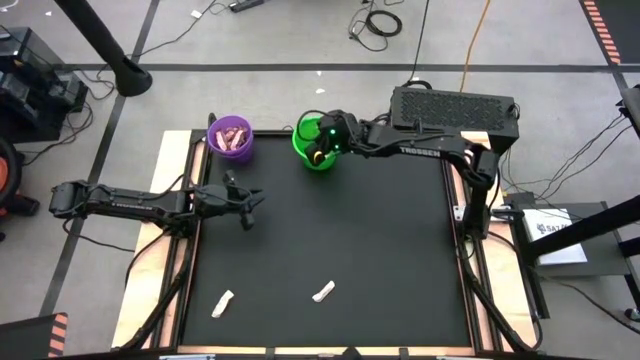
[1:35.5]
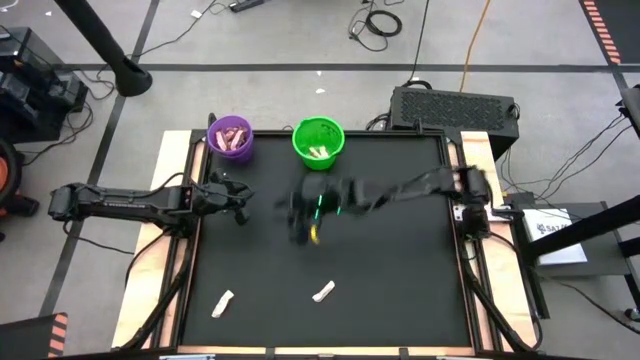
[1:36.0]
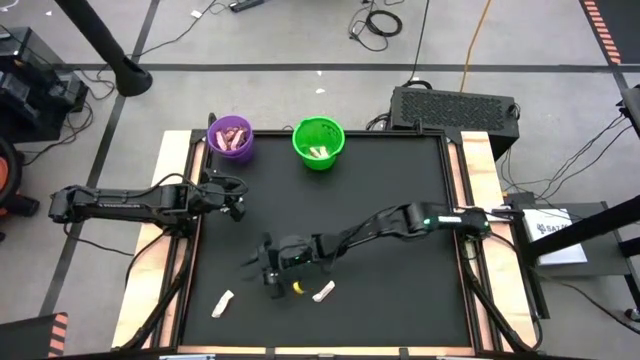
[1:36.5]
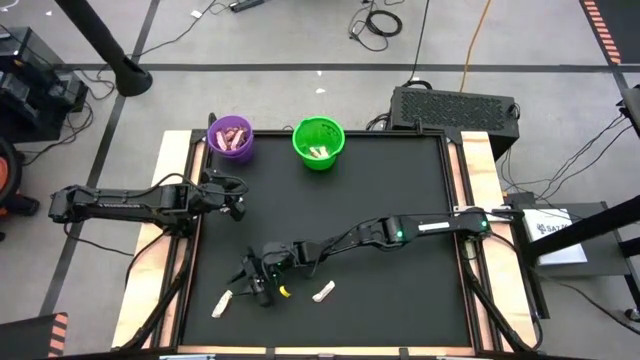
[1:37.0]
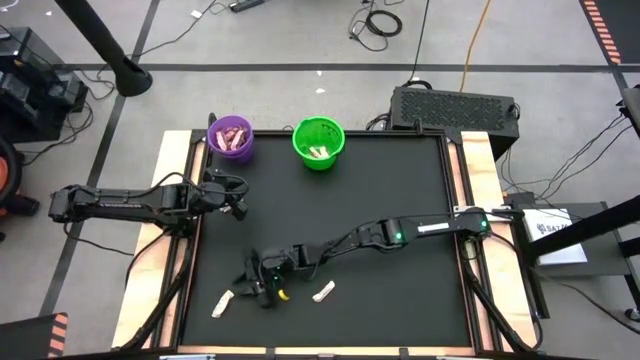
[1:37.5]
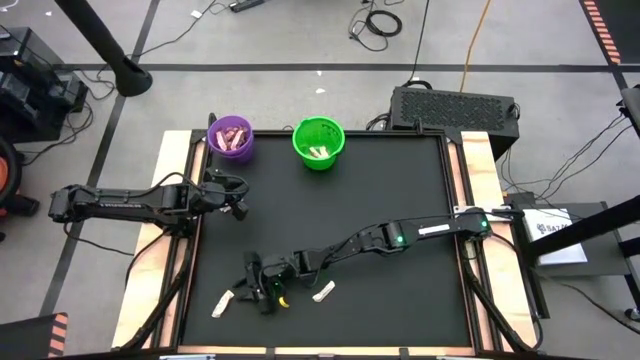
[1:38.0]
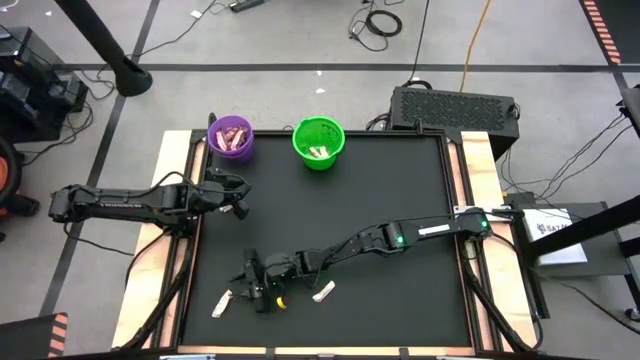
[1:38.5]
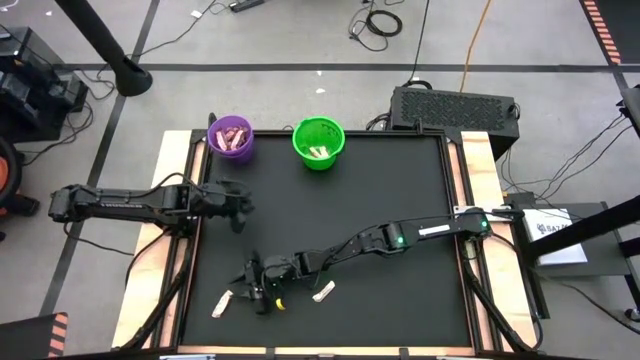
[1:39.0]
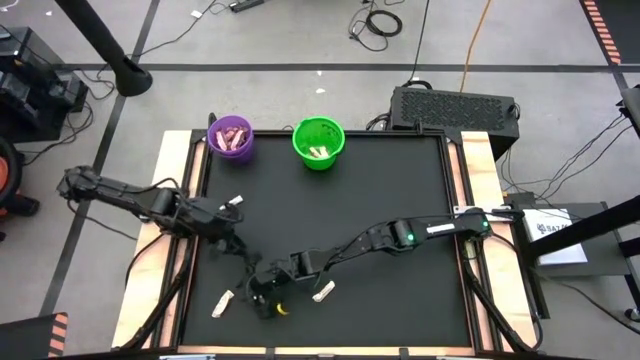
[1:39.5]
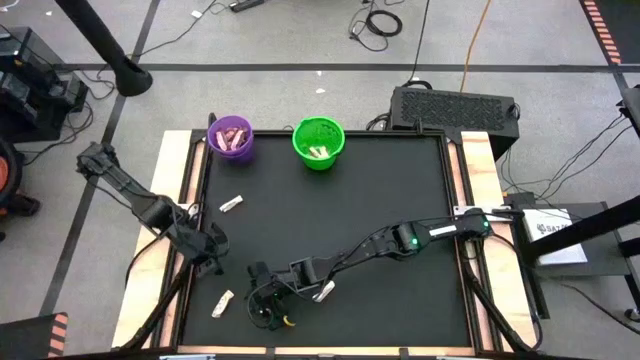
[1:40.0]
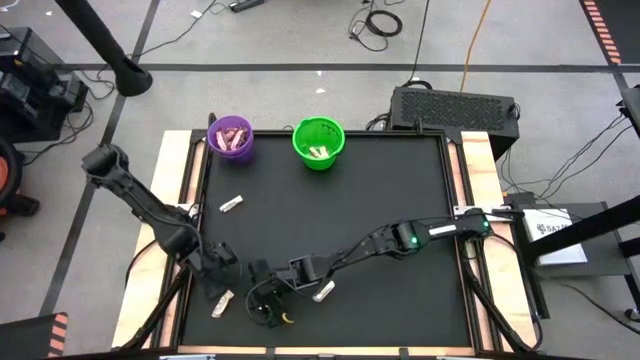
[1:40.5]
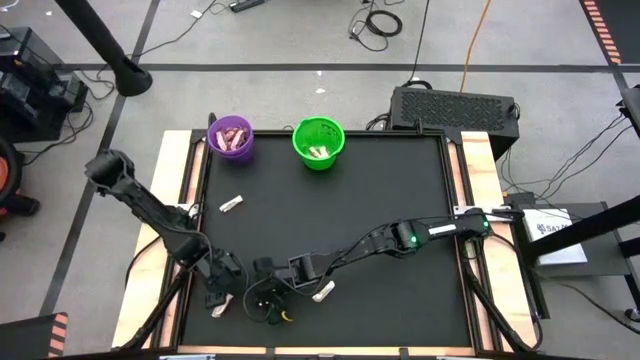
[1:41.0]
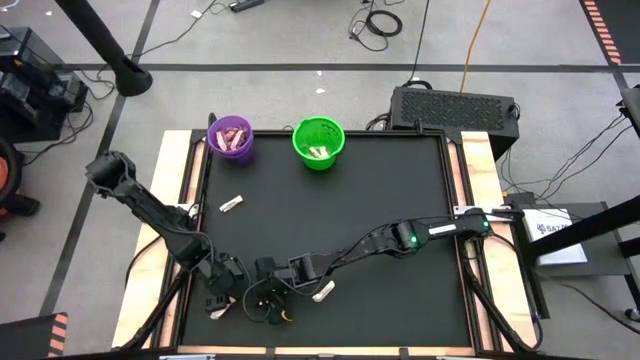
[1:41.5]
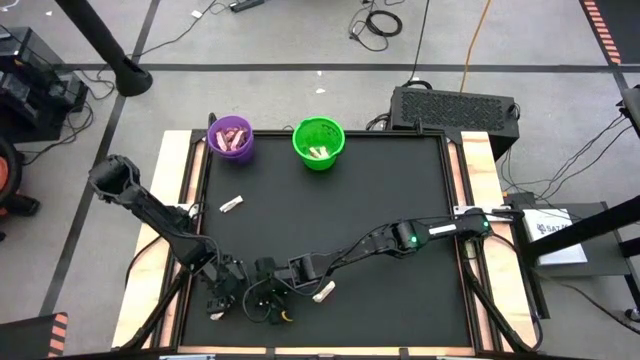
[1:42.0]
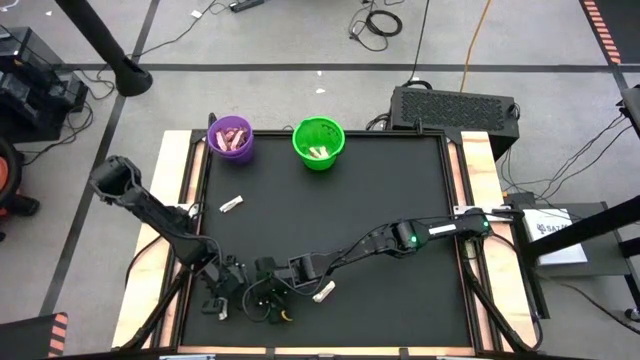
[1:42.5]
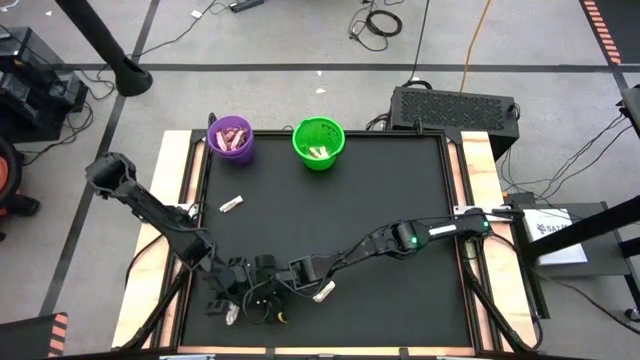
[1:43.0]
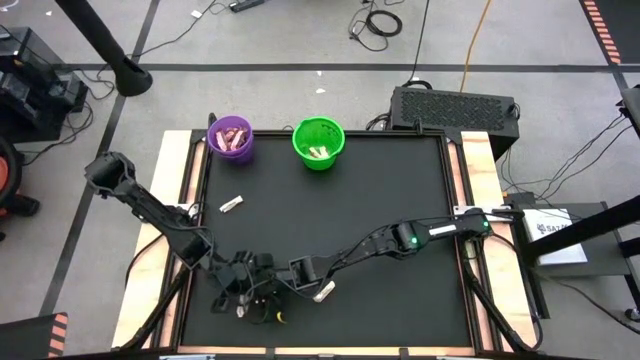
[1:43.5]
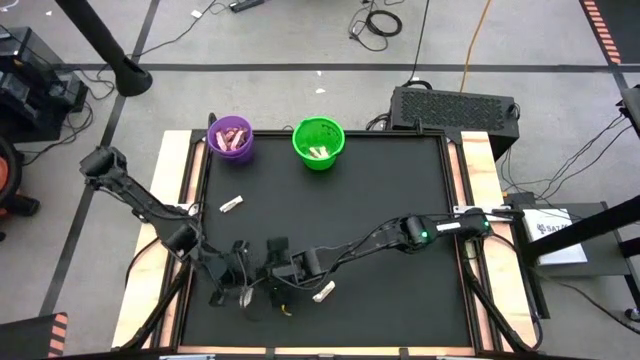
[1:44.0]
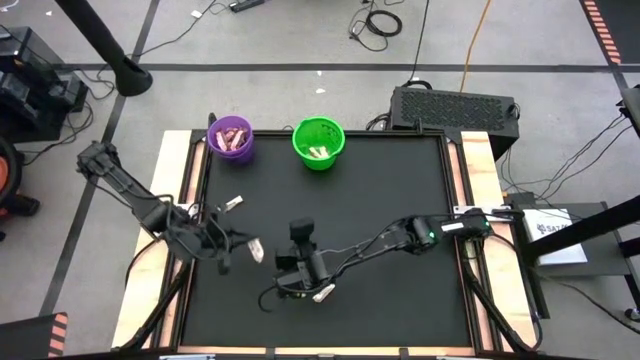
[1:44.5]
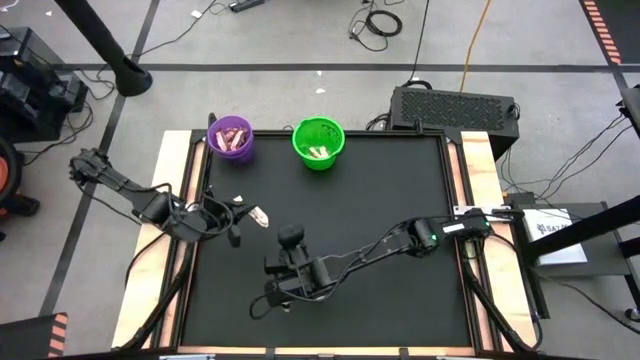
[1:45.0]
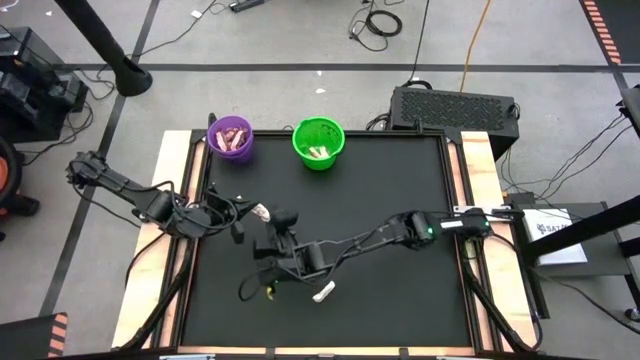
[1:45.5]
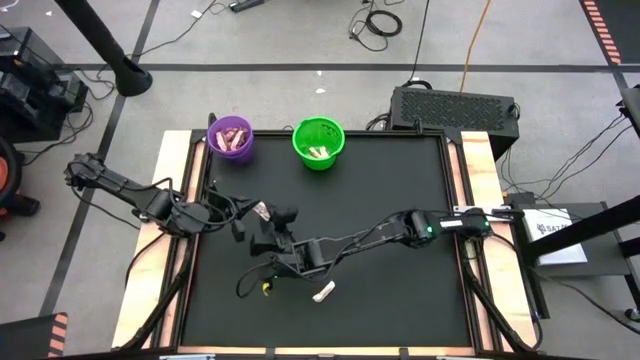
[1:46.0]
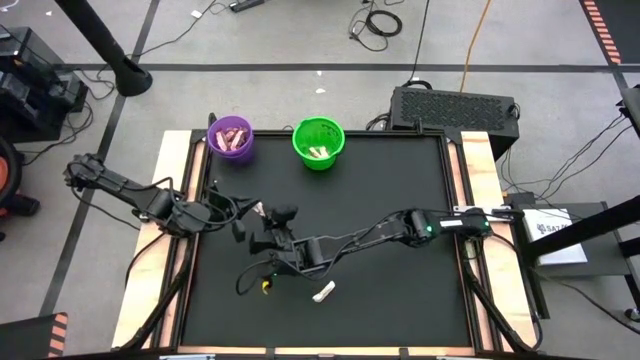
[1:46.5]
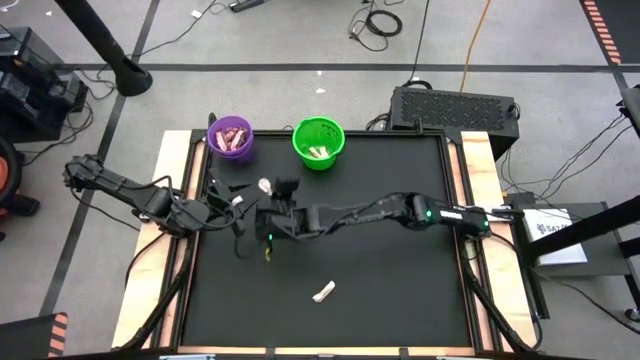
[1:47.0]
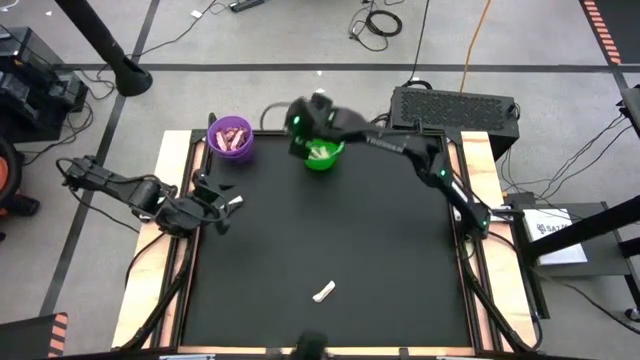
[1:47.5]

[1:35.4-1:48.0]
Task: Sort candy by brand, put in halloween buckets
Put the white chocolate bar into the green bucket

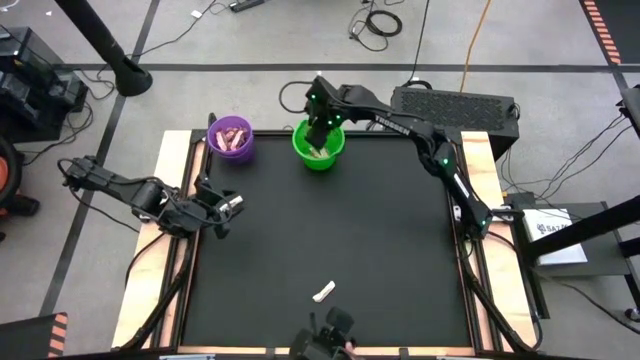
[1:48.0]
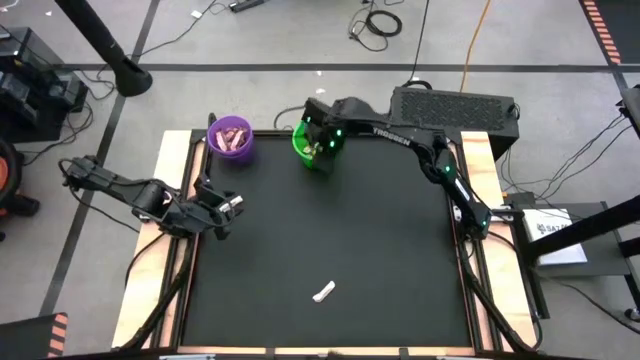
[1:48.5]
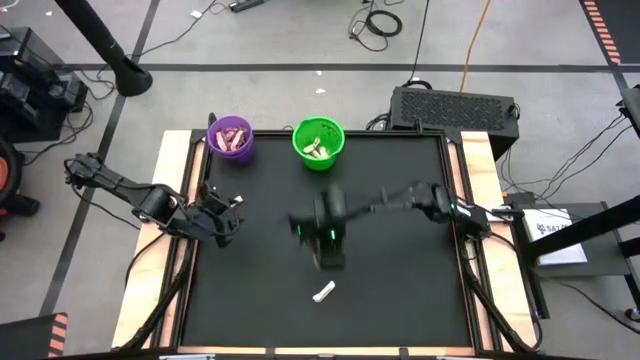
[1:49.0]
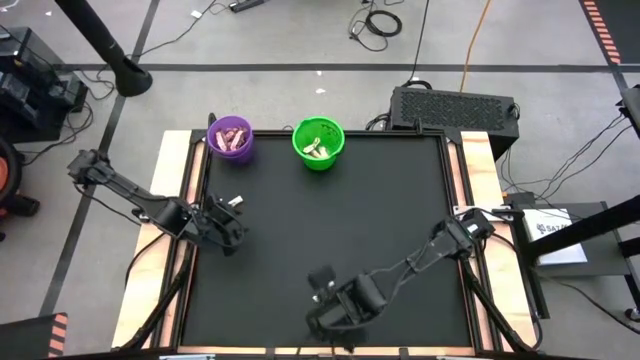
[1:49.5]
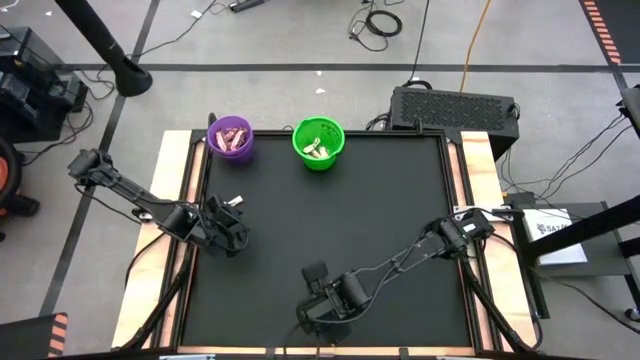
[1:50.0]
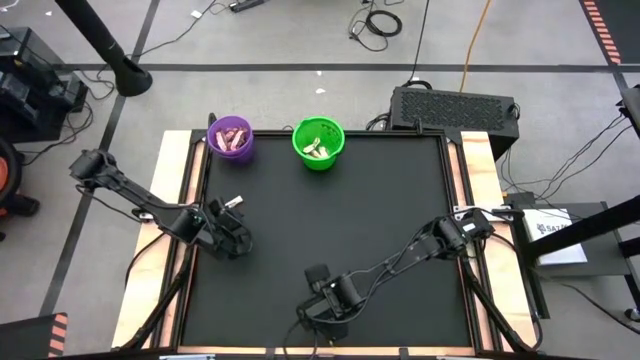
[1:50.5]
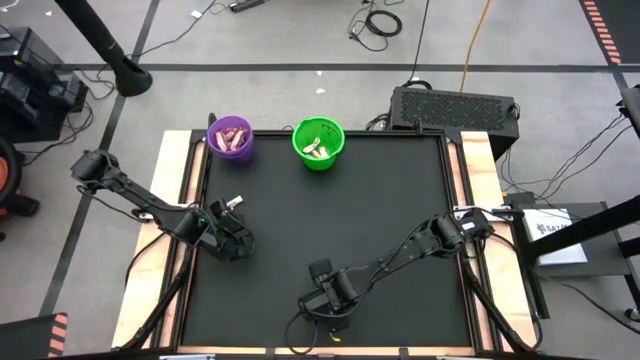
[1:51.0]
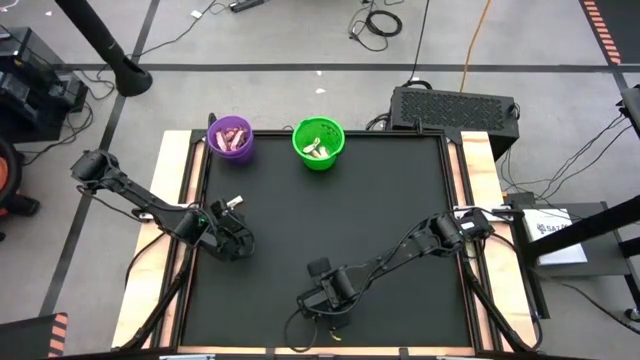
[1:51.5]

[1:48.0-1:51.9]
Put the white chocolate bar into the green bucket

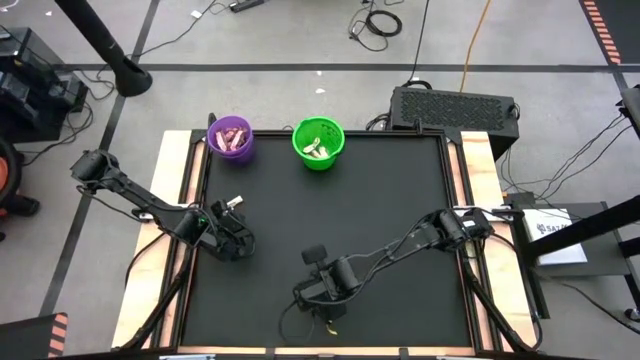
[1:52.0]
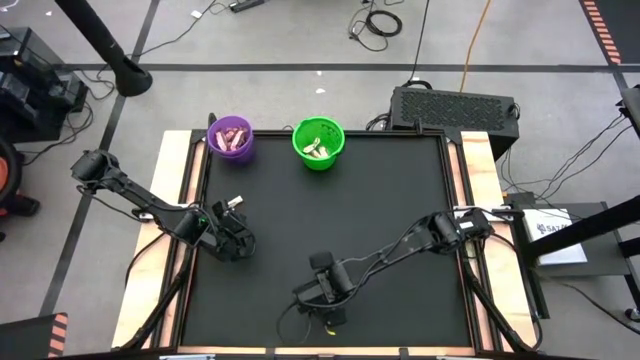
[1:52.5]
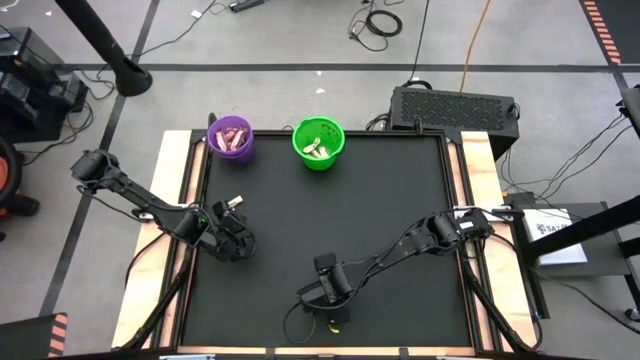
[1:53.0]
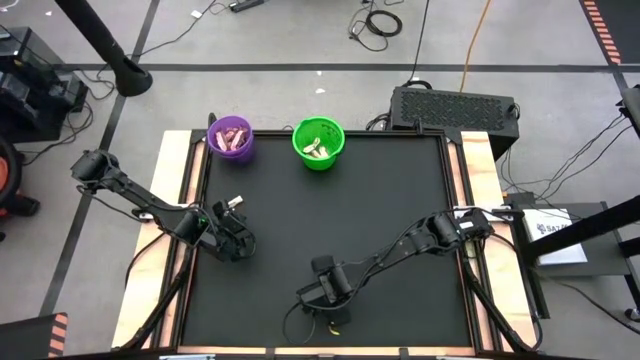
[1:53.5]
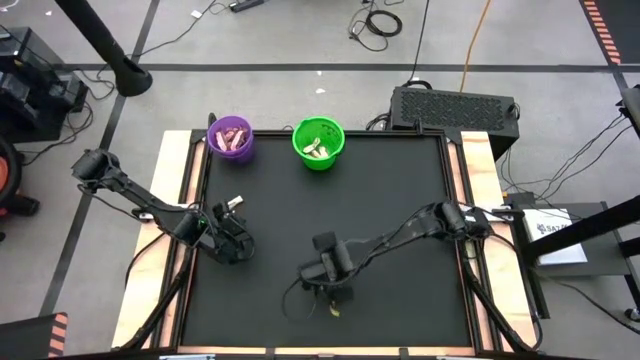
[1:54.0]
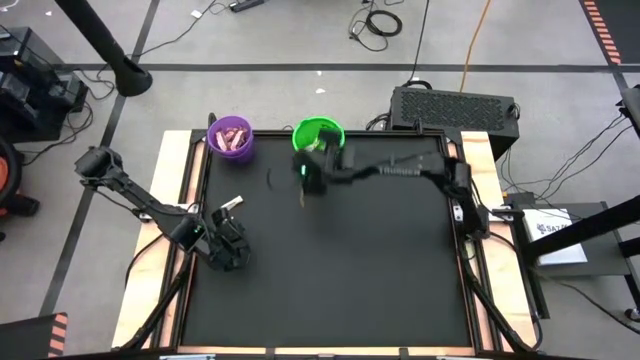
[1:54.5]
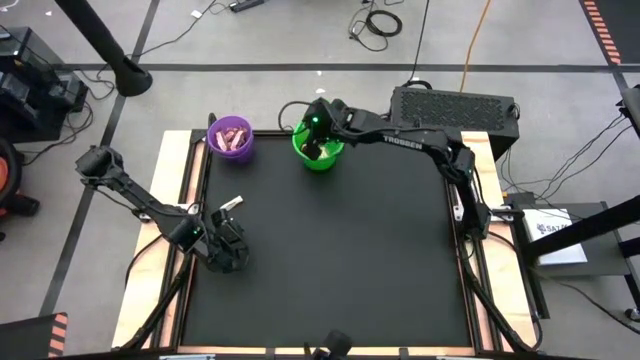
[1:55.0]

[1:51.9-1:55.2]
Put the white chocolate bar into the green bucket

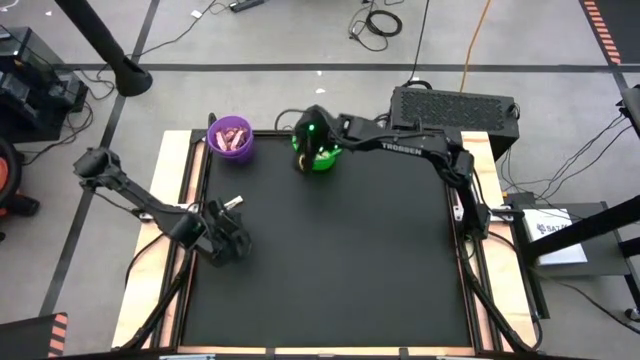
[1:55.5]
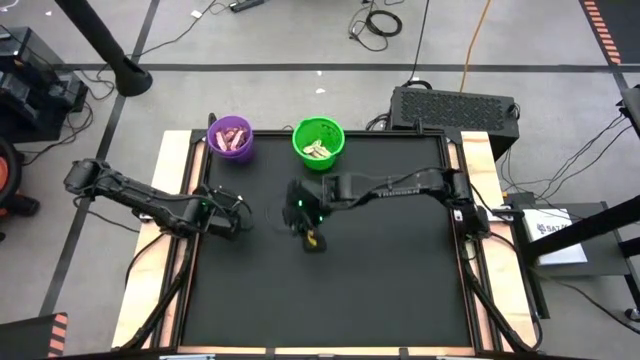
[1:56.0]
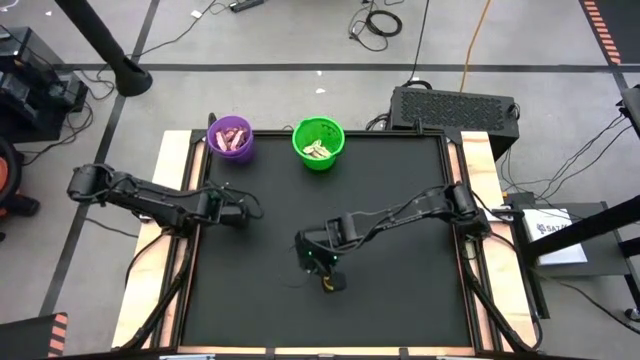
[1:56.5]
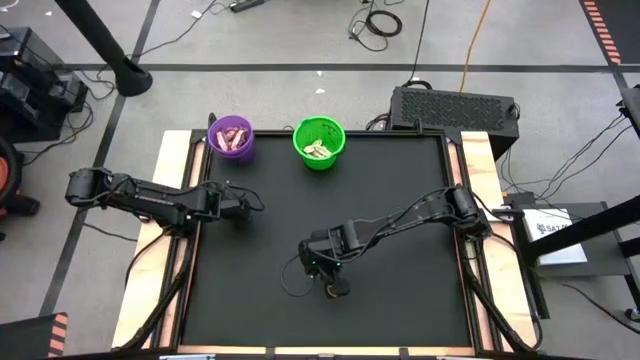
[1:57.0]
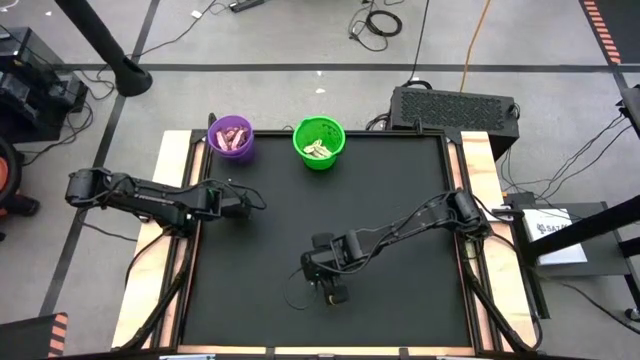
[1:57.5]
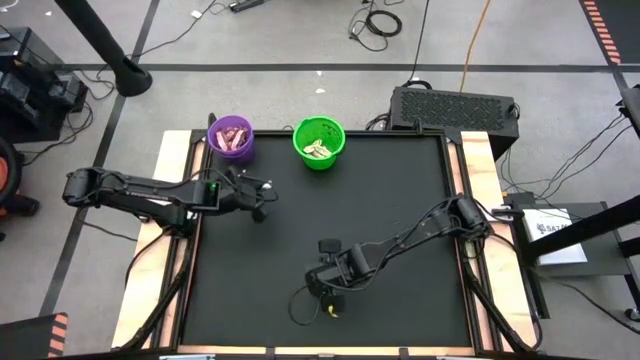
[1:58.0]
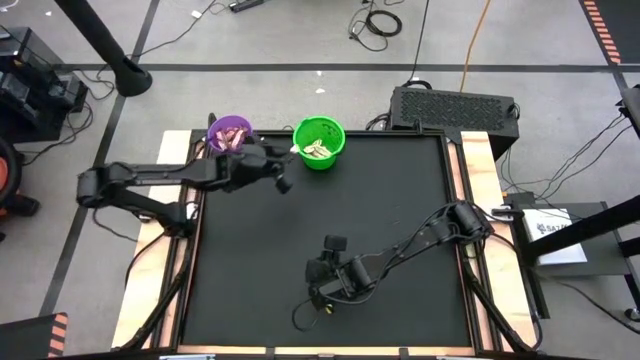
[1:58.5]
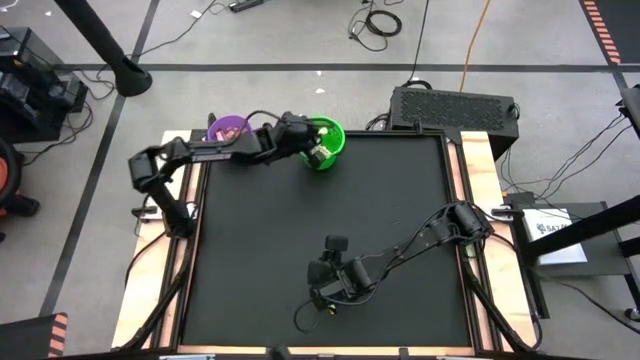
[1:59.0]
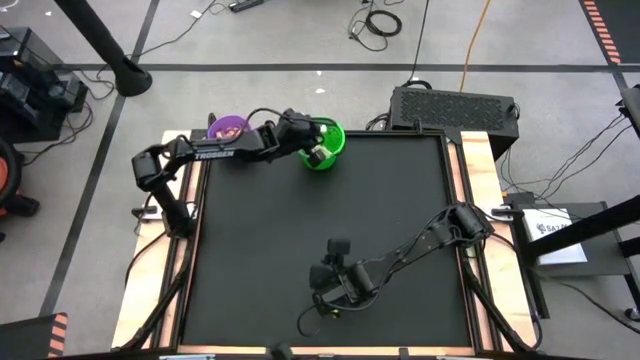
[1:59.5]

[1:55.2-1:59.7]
Put the white chocolate bar into the green bucket
